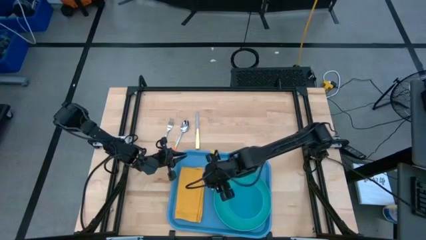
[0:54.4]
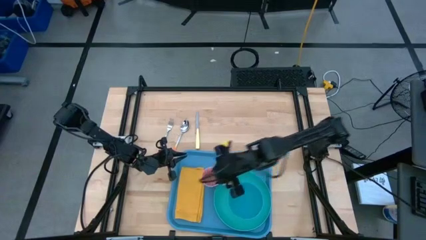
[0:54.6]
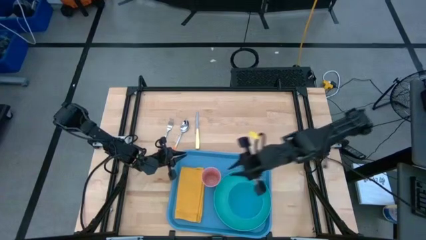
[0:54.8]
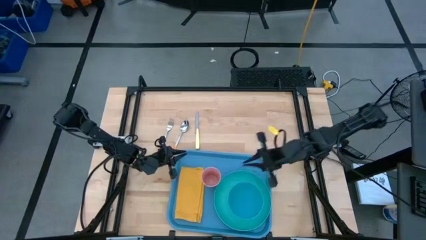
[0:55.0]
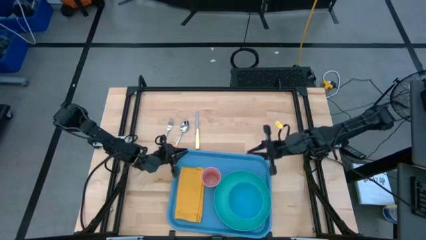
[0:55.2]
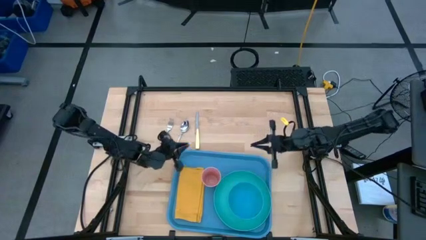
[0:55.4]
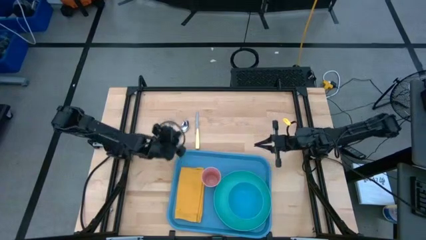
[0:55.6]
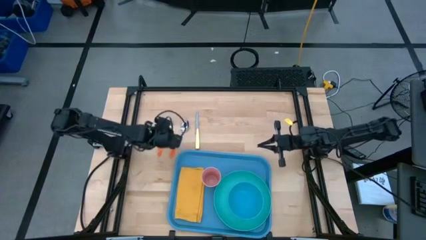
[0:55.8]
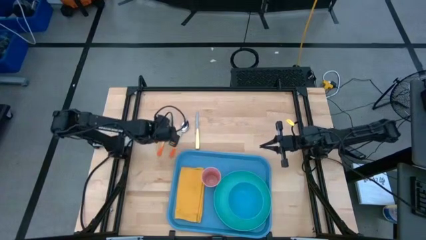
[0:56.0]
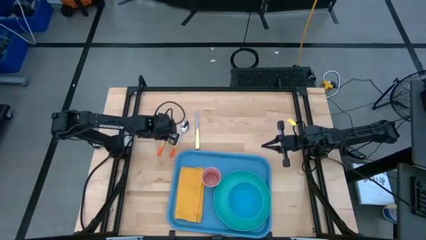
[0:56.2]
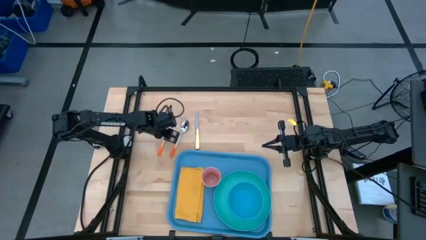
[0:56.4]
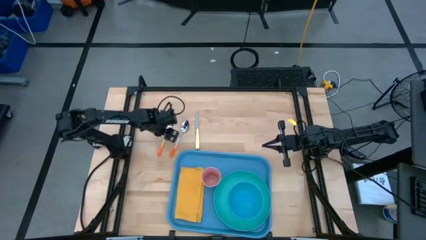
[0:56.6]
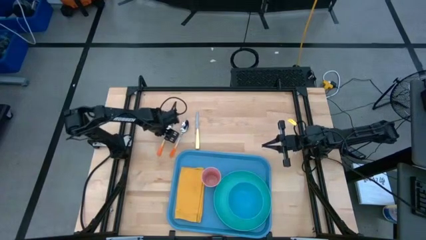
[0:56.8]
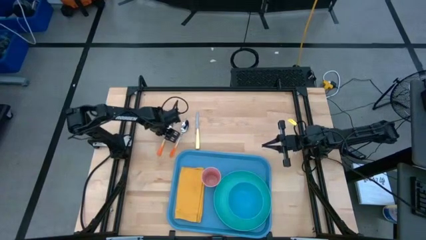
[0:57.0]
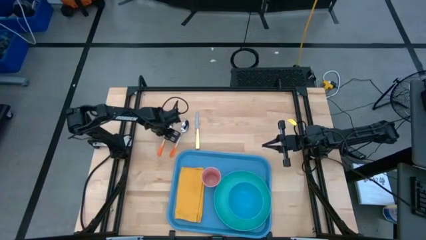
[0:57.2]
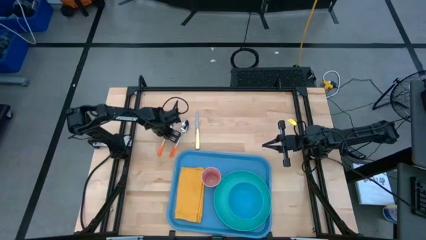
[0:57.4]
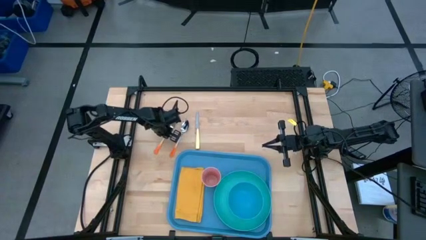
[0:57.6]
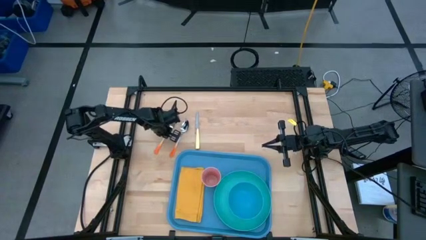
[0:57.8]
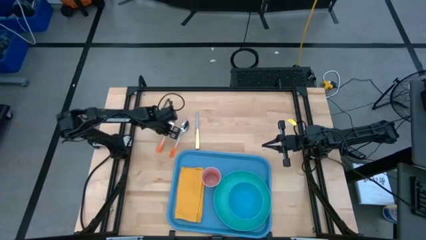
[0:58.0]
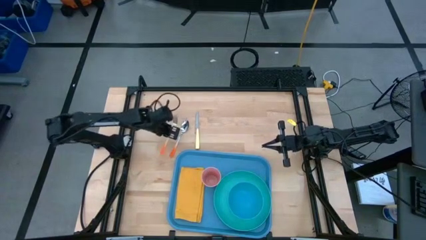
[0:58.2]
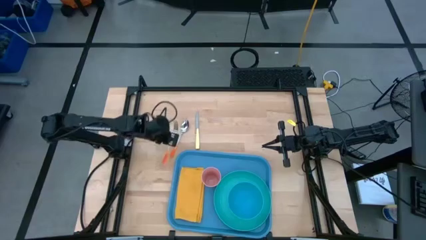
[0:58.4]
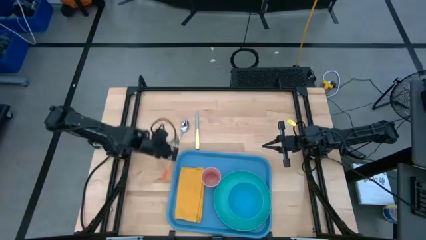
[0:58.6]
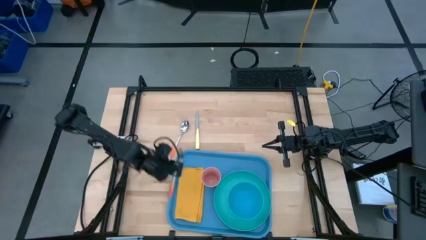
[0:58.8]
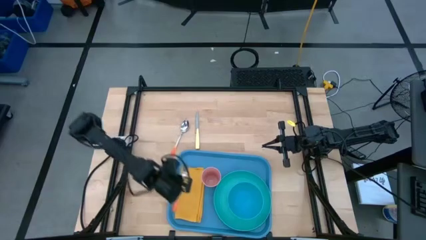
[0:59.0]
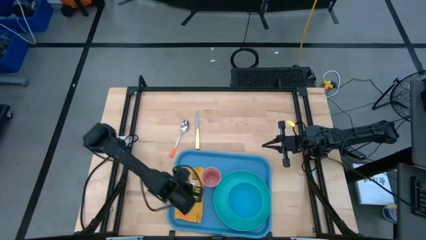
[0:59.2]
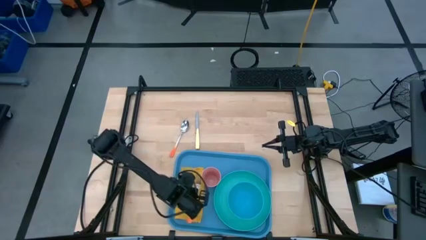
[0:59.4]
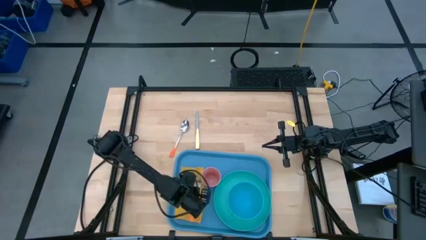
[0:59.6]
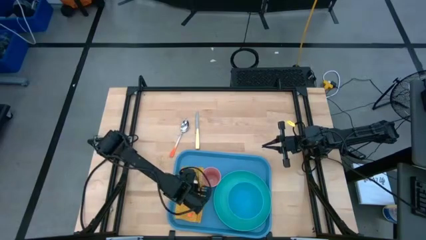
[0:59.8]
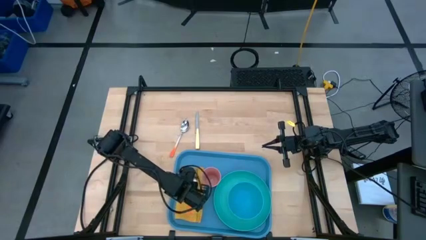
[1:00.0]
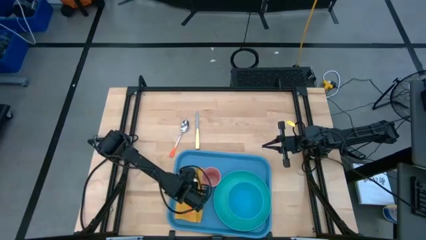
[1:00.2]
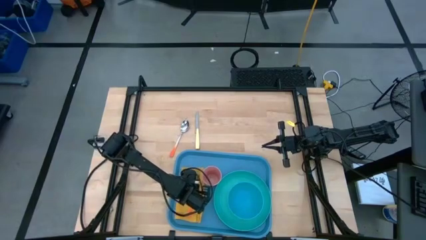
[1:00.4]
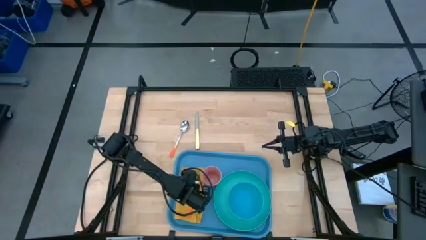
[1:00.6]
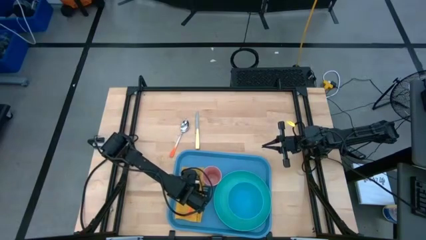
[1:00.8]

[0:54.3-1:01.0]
Task: Set up tray
Put the orange fork on the yellow napkin on the blue serving tray

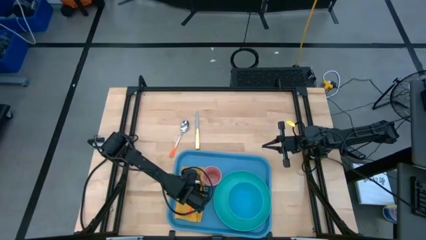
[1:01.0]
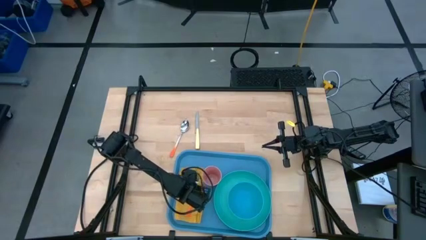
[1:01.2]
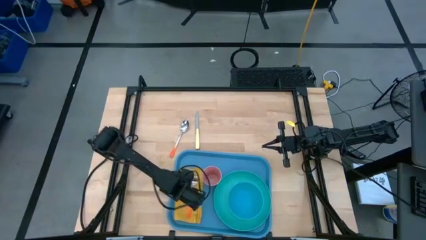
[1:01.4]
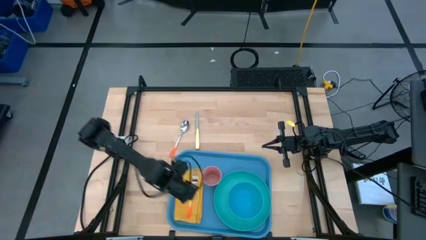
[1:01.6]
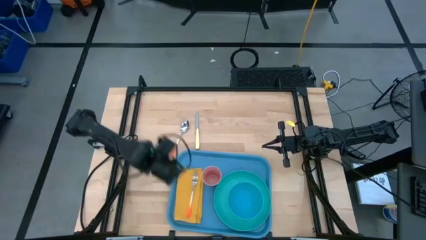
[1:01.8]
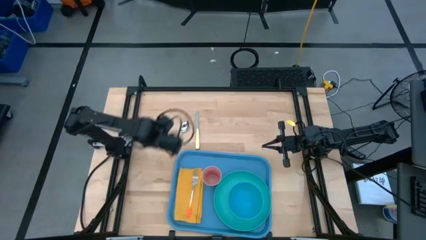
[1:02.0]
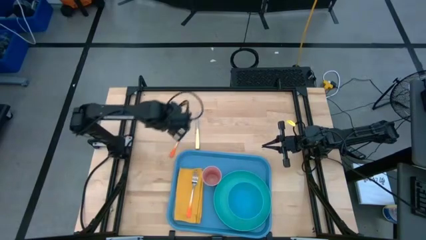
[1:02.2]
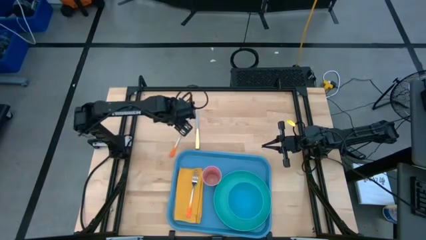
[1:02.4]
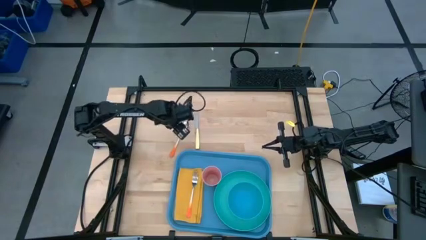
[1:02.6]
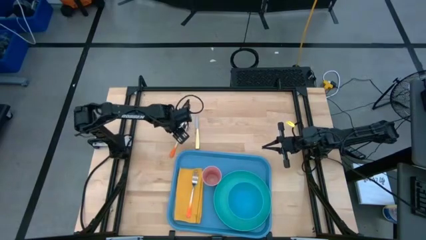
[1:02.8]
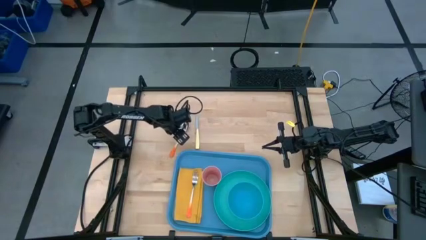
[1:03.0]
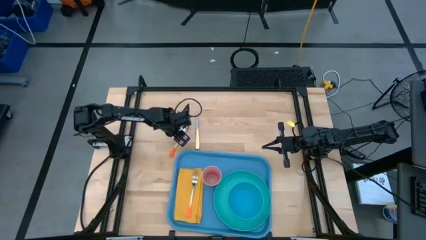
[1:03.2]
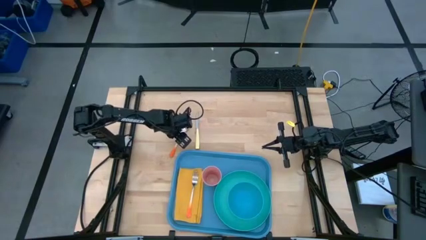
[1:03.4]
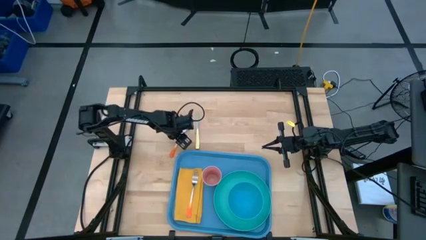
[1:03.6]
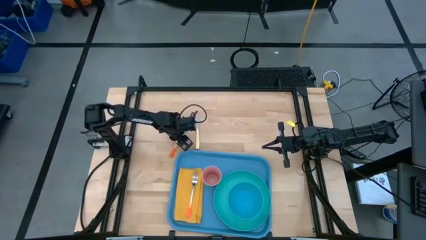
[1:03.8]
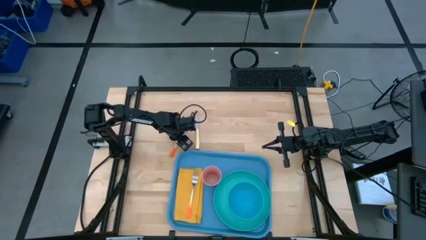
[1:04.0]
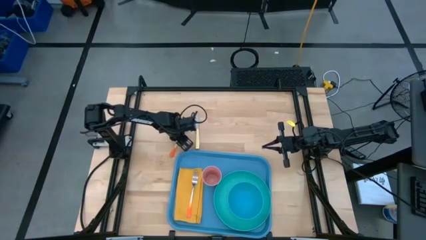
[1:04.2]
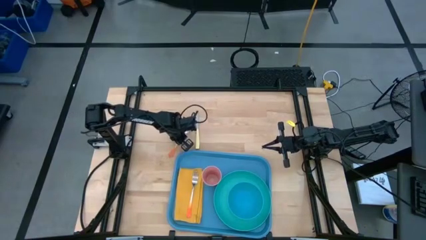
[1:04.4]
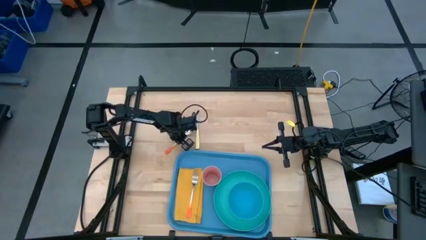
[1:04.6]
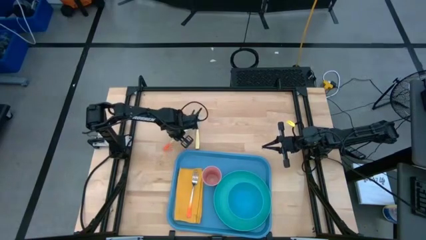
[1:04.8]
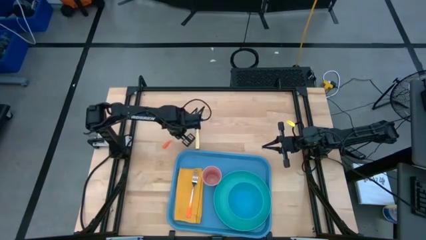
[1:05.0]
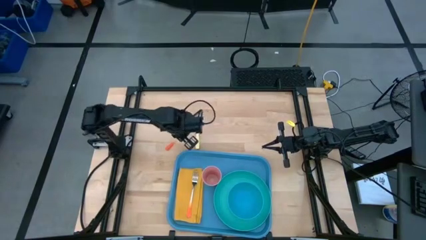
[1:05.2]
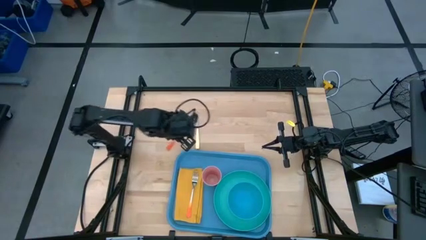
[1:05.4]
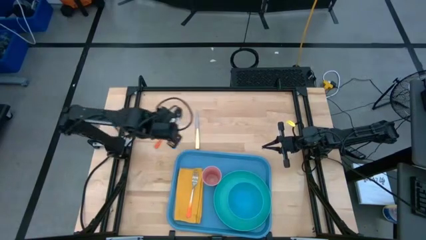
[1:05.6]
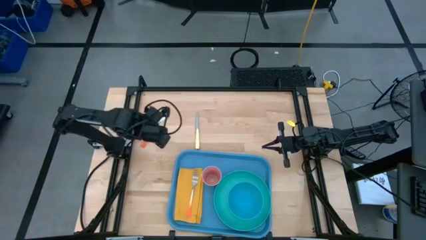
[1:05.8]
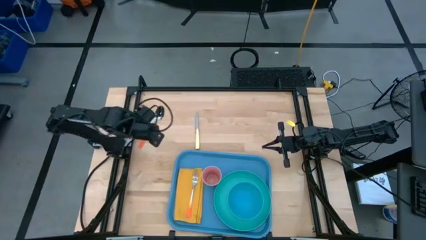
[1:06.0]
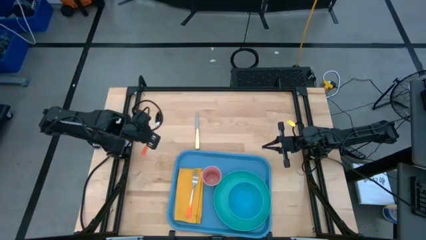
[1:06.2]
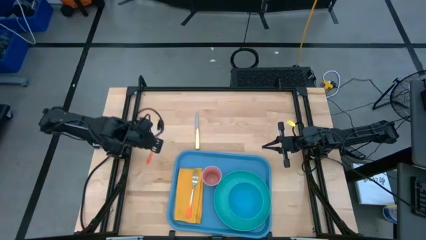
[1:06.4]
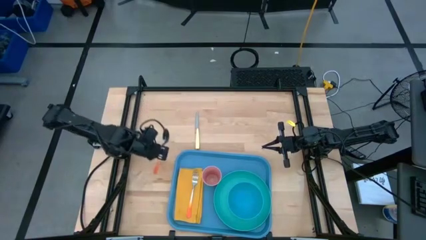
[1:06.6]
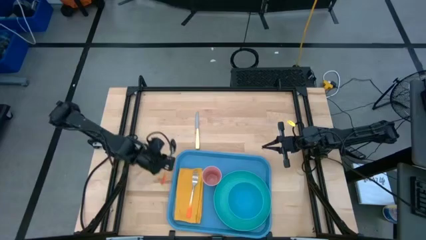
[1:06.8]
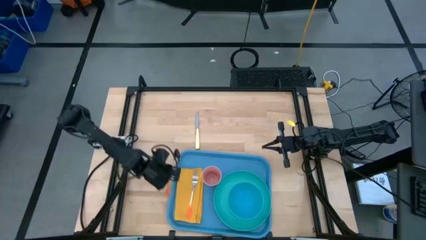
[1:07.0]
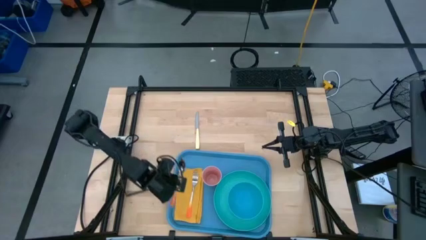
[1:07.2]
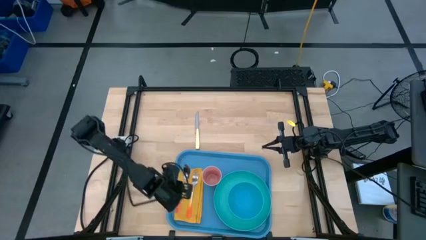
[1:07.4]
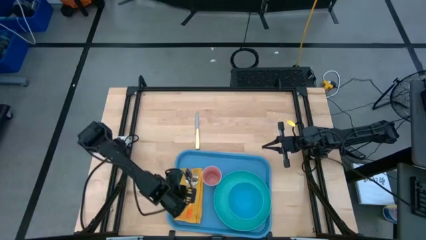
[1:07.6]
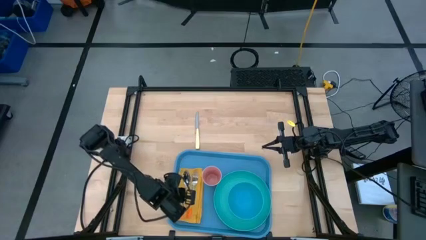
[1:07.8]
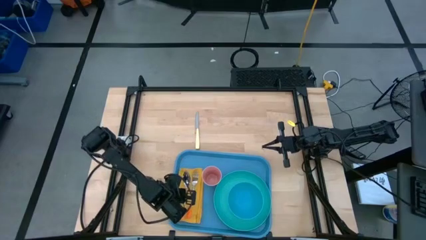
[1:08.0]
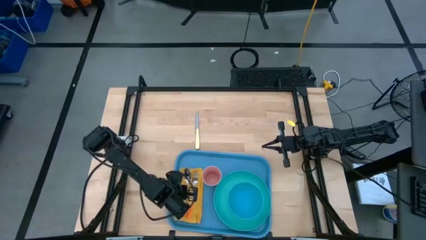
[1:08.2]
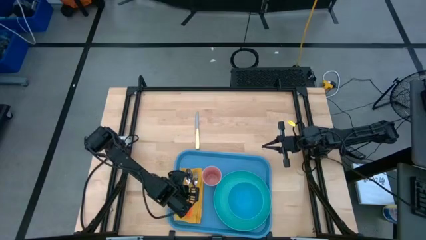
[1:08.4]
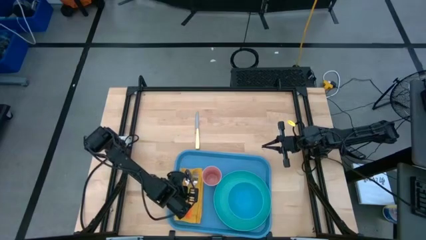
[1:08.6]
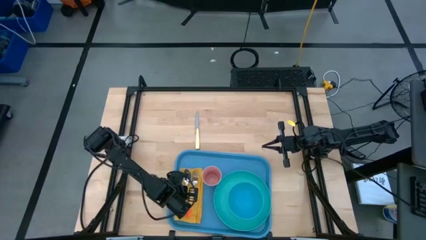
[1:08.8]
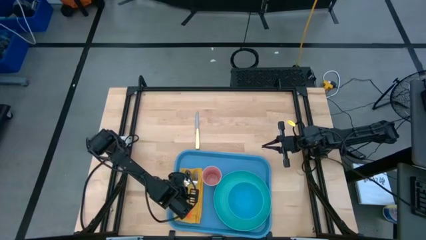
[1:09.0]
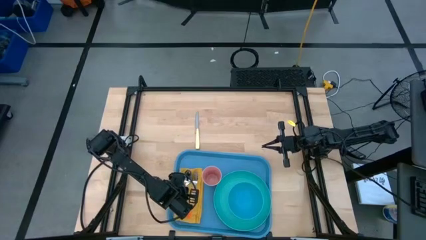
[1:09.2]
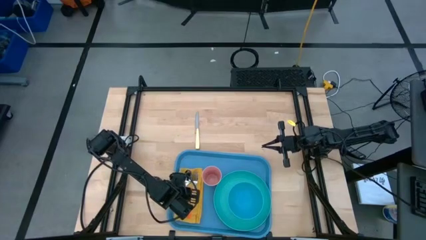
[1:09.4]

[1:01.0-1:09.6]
Put the orange spoon to the left of the orange fork on the yellow napkin on the blue serving tray
